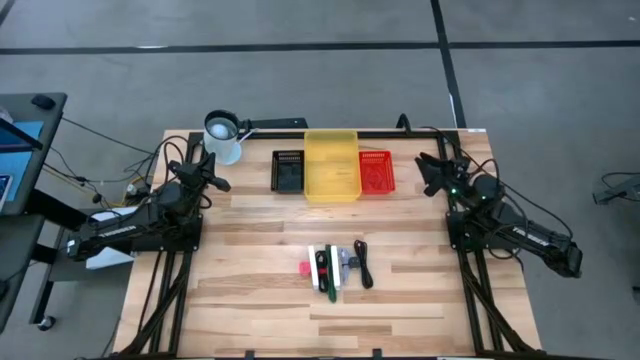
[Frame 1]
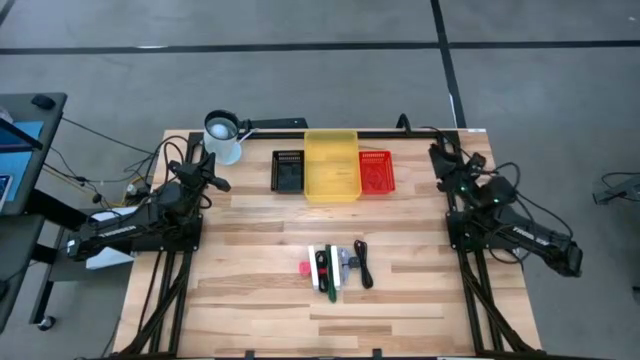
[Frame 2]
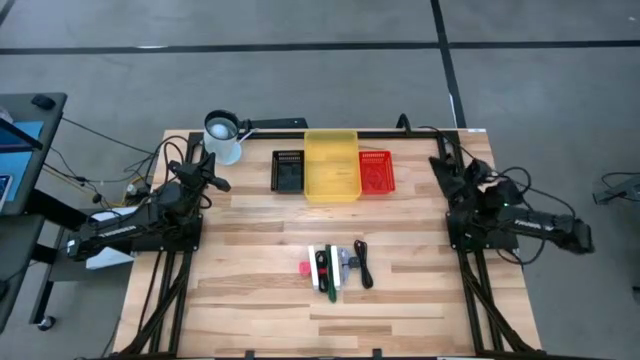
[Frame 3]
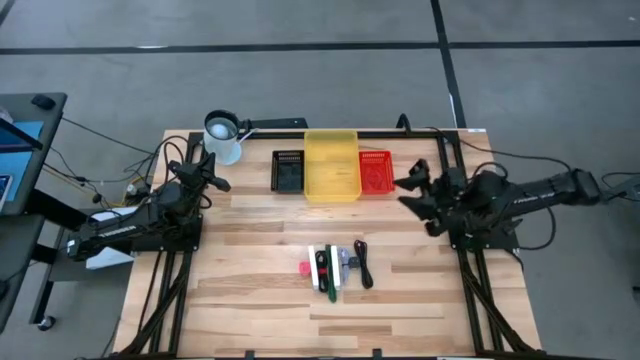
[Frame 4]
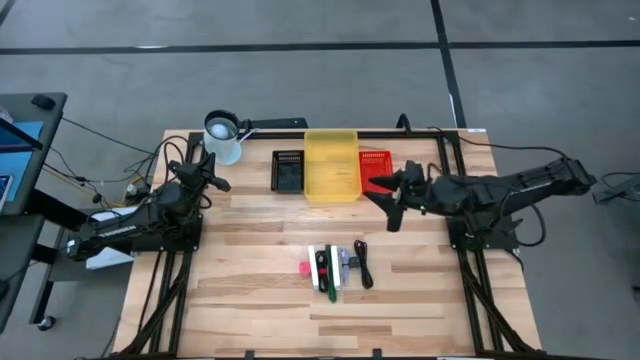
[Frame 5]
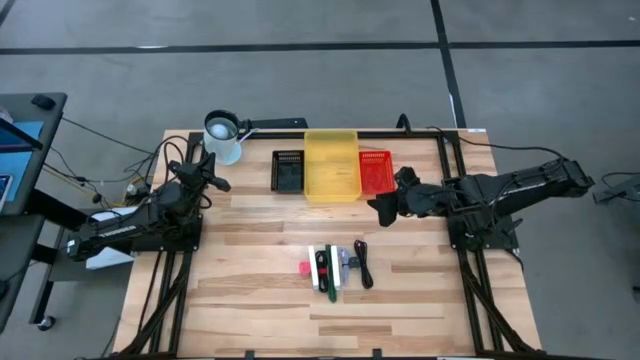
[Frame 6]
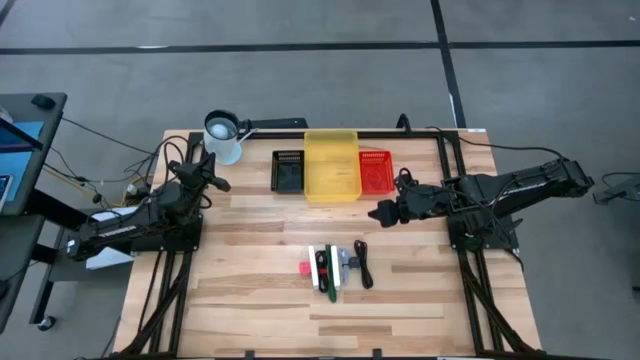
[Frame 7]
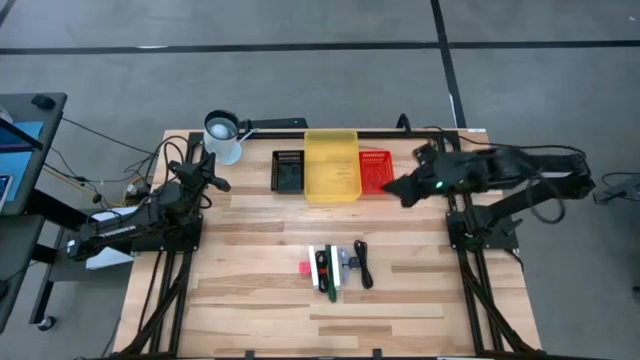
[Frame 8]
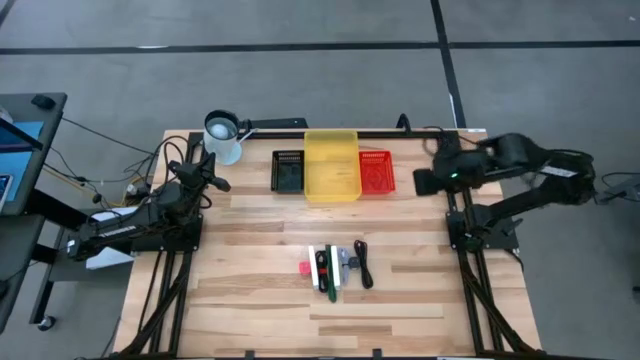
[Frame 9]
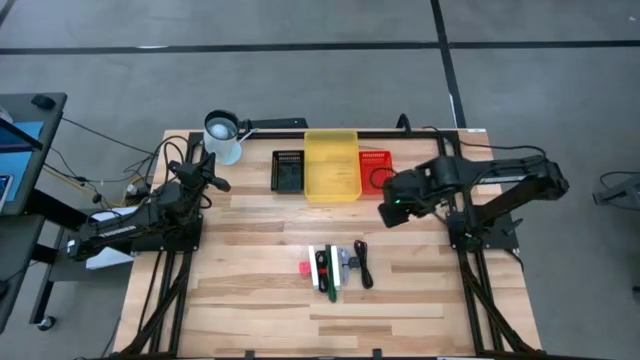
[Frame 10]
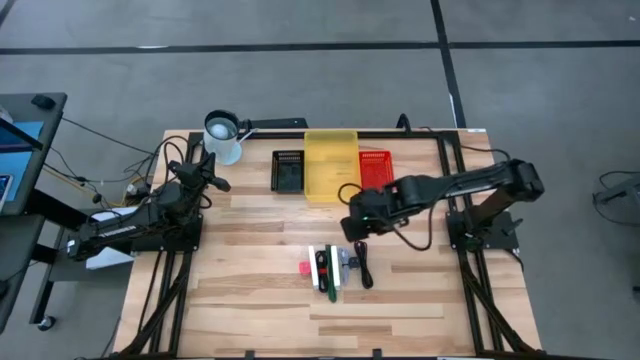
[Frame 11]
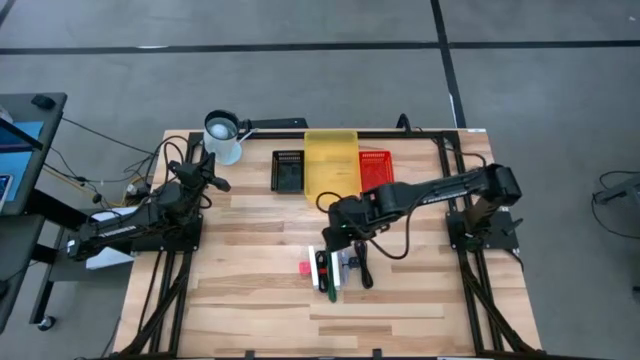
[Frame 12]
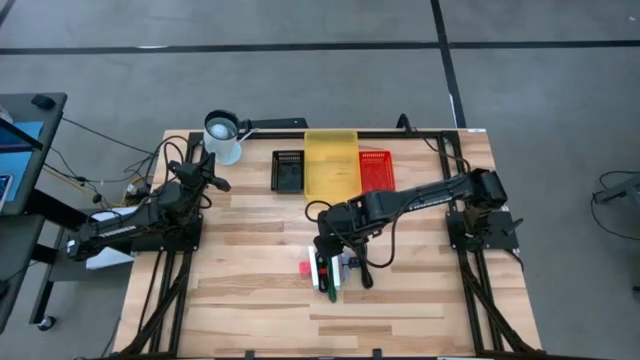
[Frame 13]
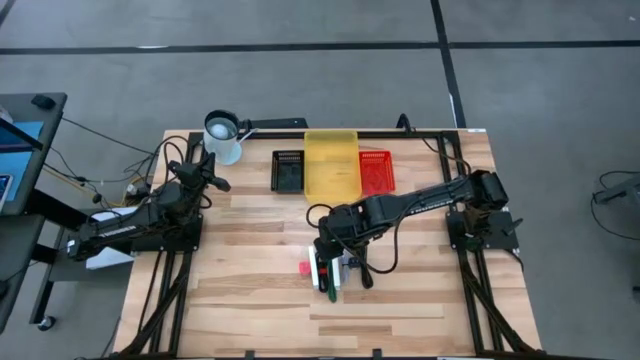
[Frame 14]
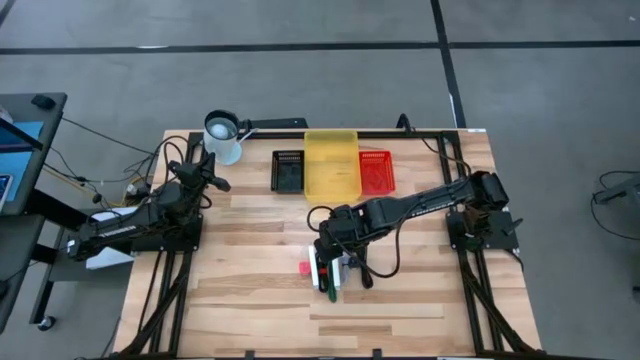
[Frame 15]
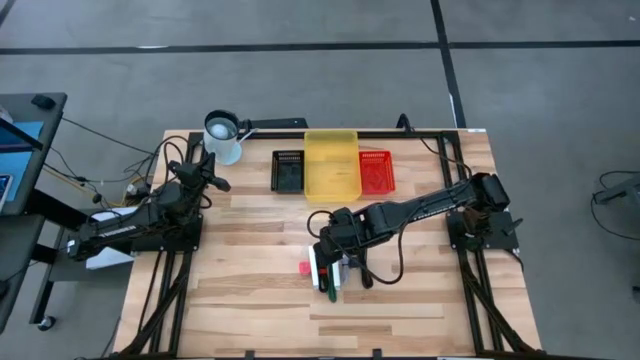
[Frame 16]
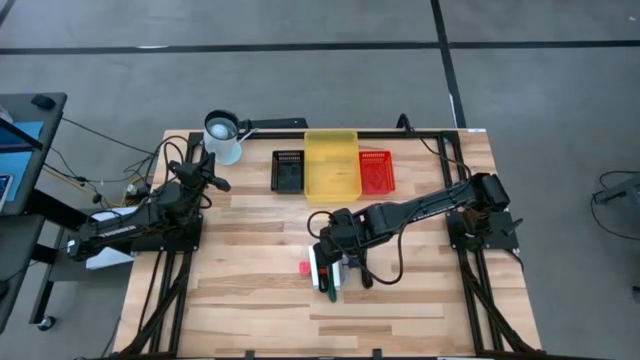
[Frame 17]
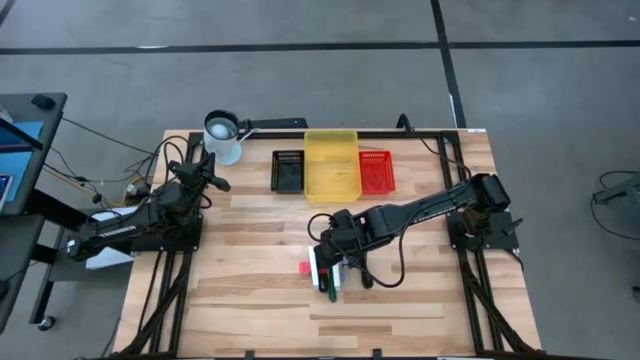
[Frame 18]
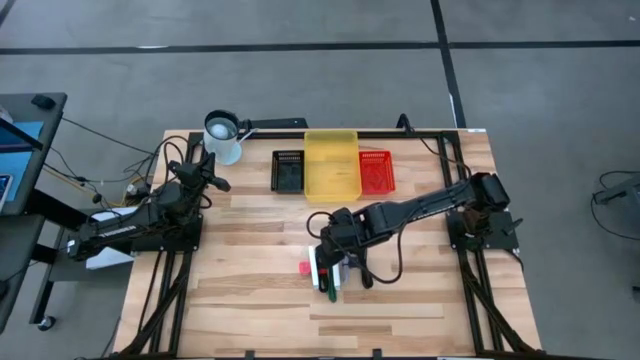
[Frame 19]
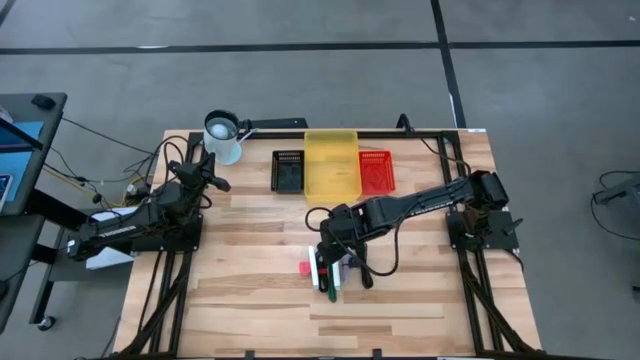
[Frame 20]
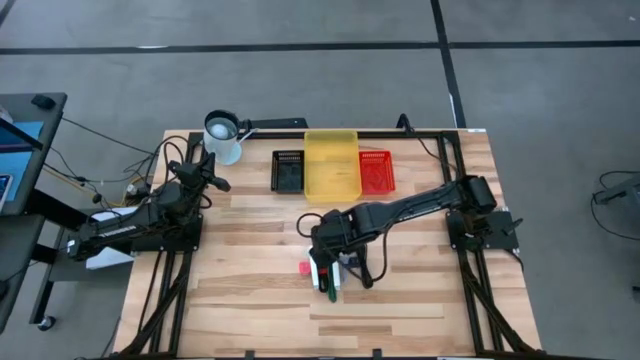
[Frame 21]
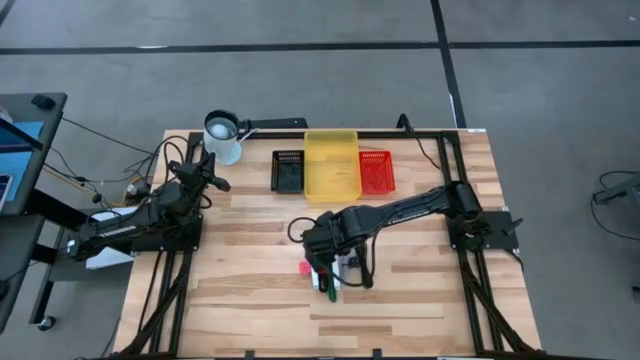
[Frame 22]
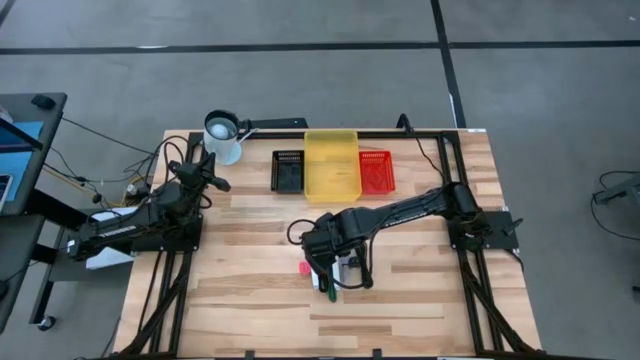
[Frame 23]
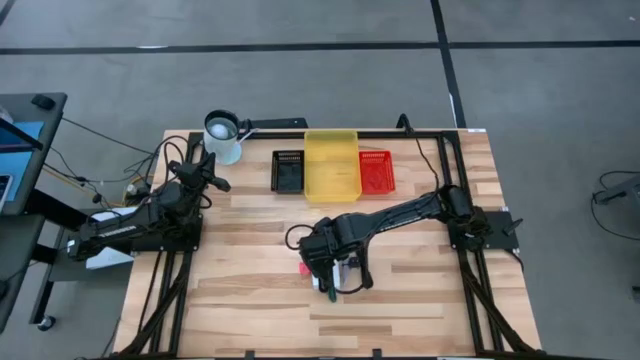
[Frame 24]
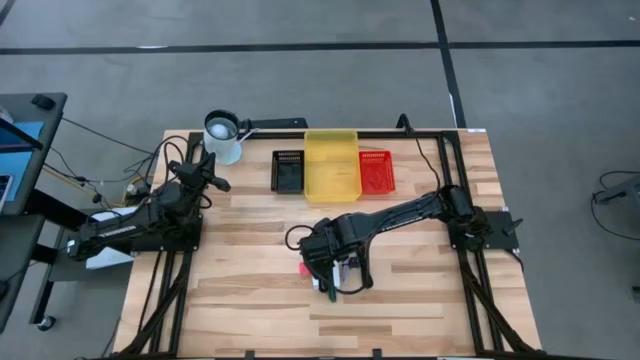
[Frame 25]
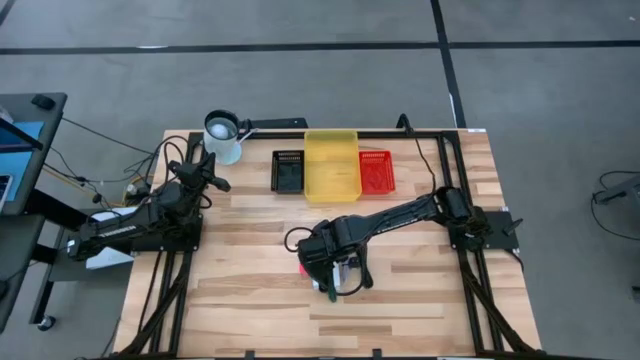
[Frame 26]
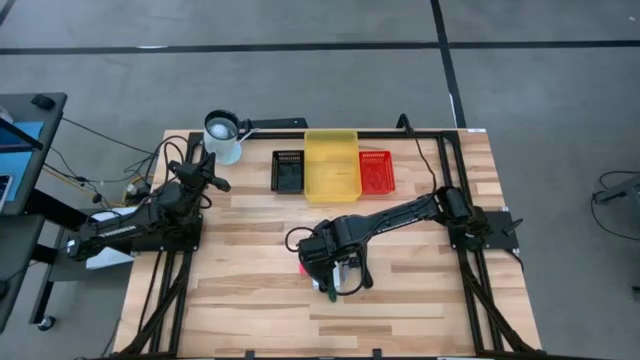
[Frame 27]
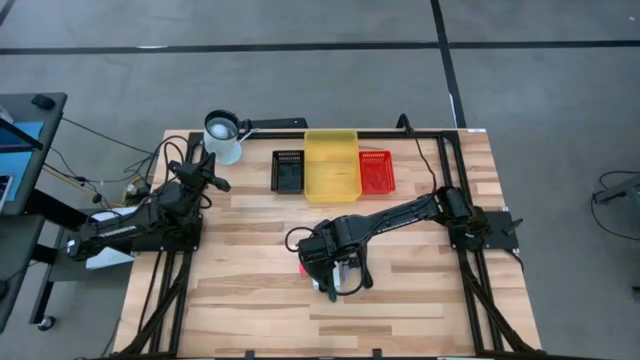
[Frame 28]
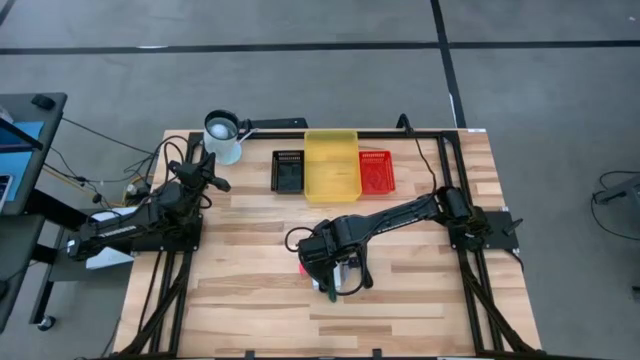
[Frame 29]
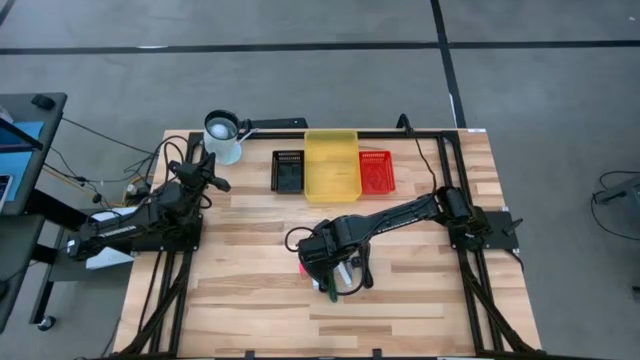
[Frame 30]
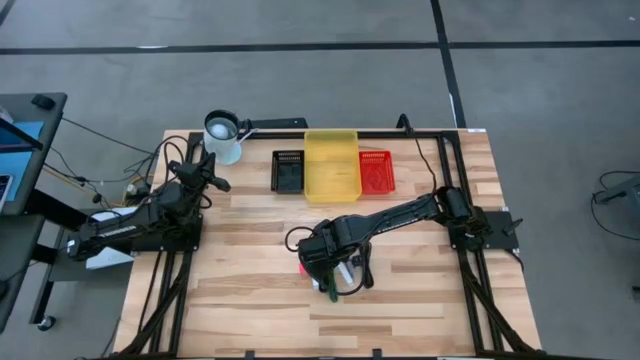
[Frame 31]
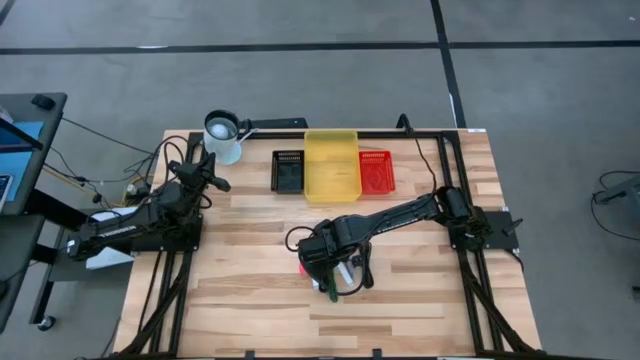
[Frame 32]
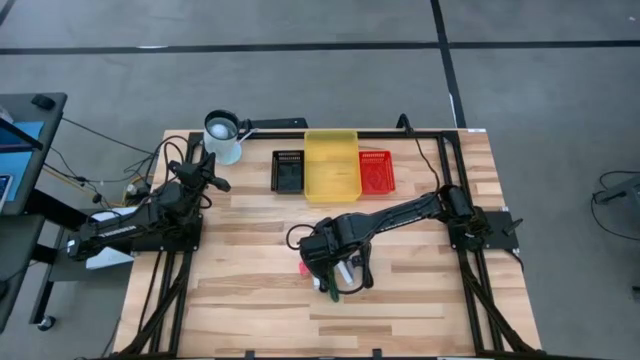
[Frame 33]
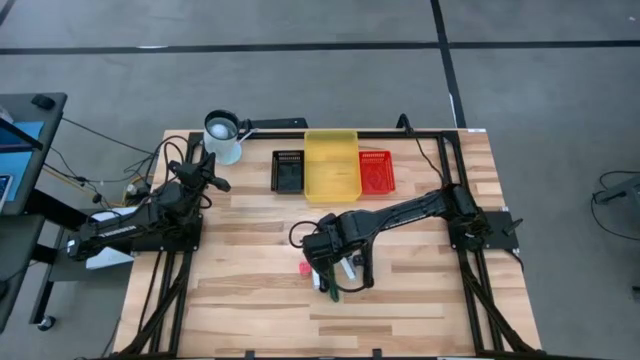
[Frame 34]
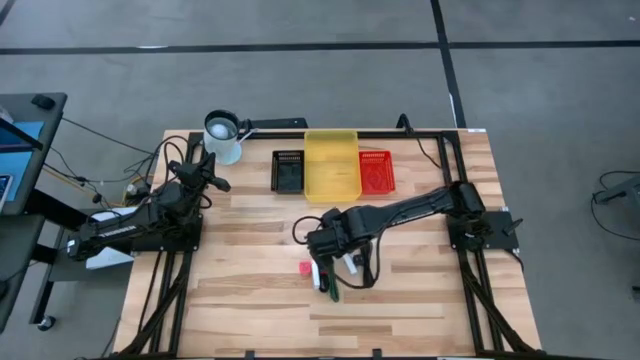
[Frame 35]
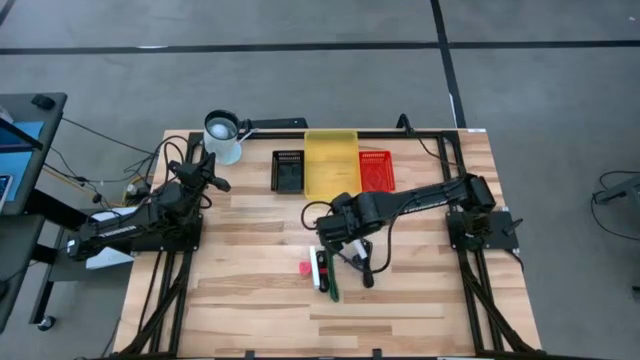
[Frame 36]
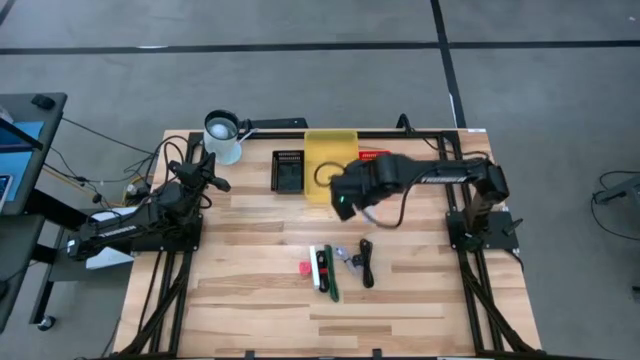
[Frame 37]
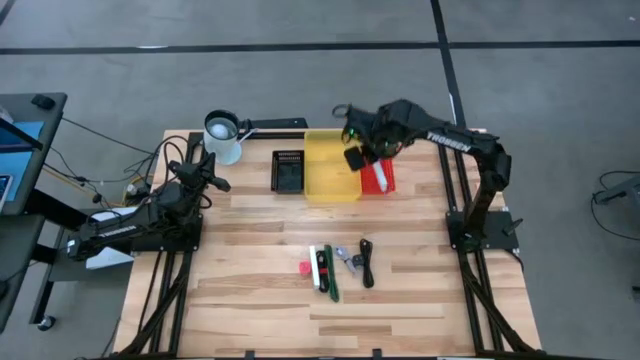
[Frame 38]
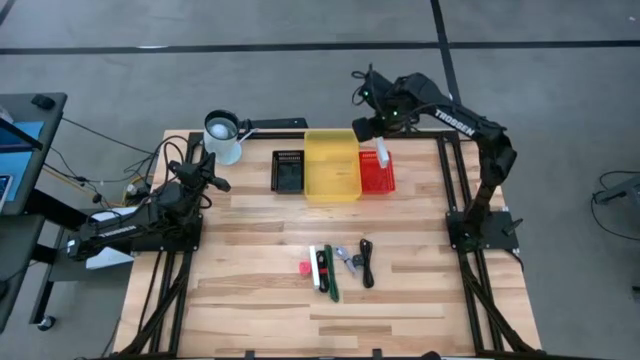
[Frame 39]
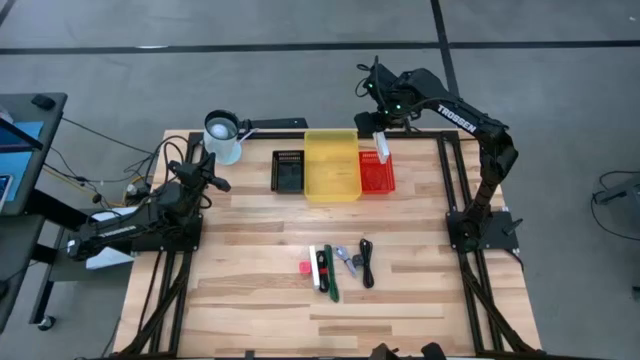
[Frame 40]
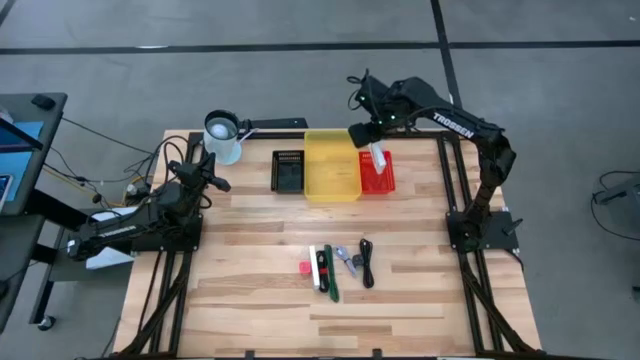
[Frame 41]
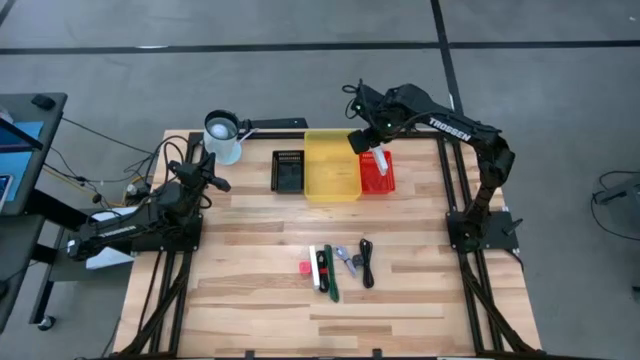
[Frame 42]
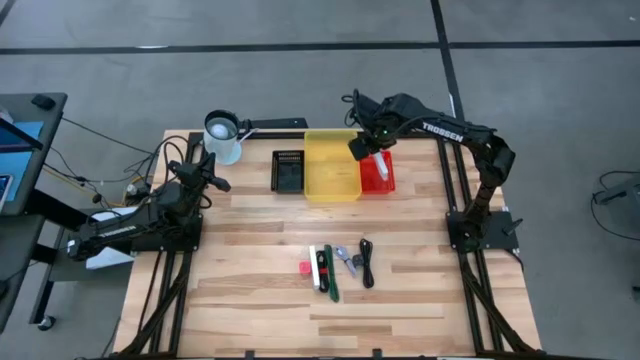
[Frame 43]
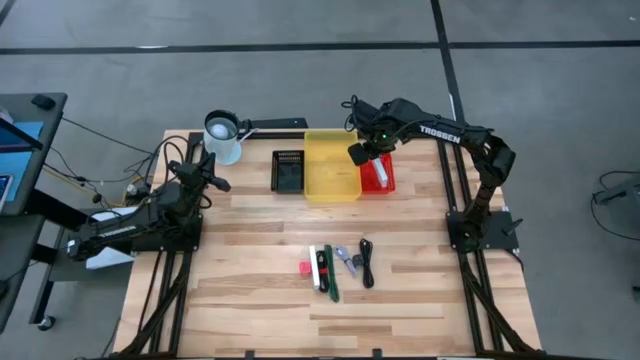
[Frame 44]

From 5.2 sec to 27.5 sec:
Task: Pick and place items into bin
Put the white card reader box into the red bin
